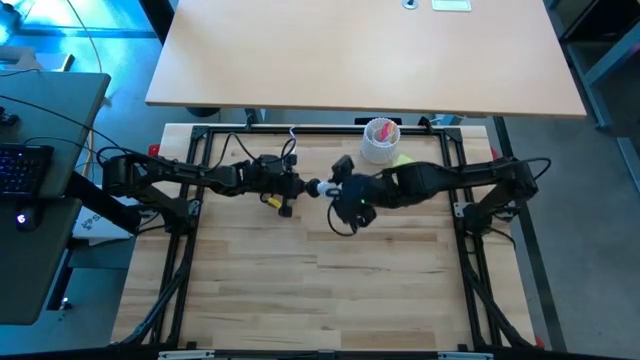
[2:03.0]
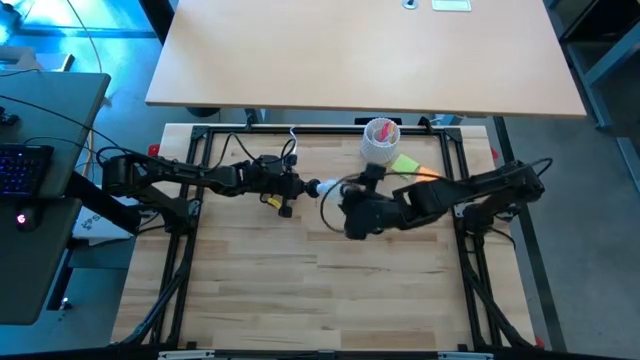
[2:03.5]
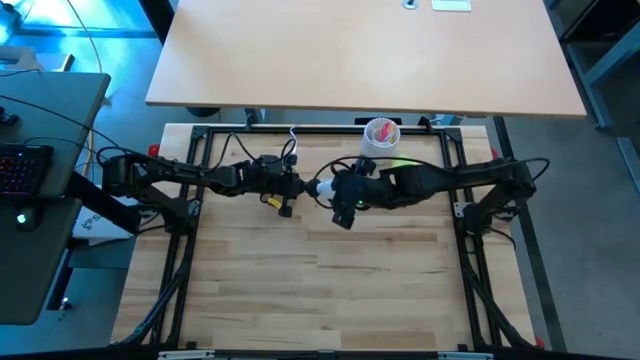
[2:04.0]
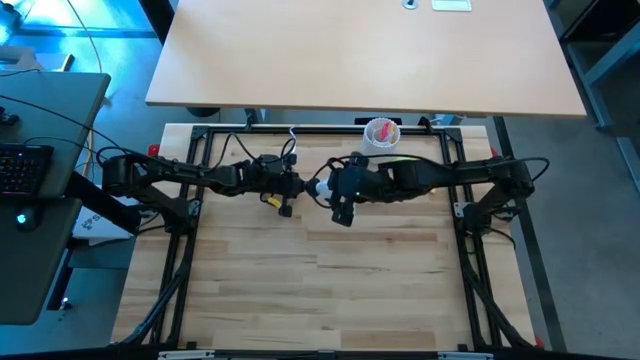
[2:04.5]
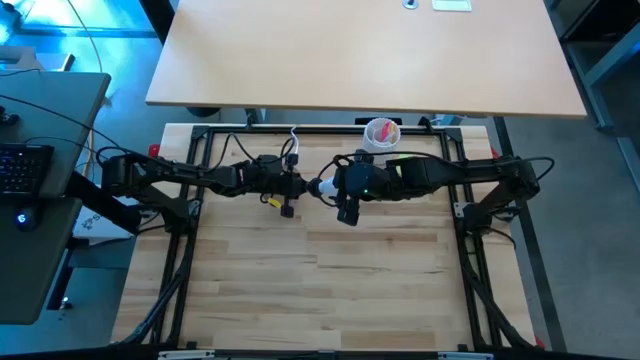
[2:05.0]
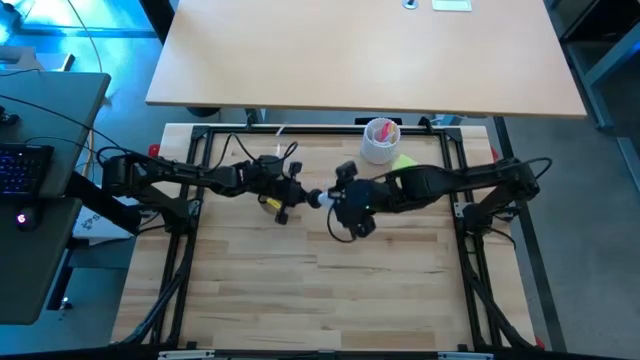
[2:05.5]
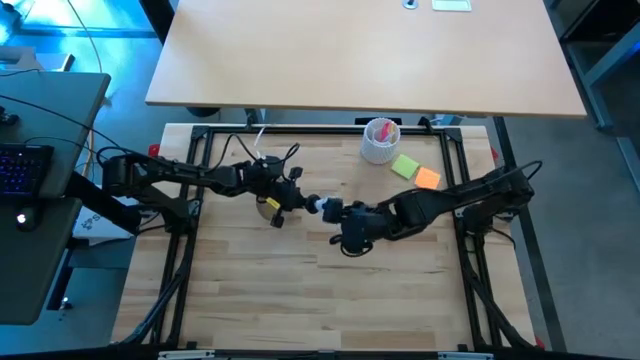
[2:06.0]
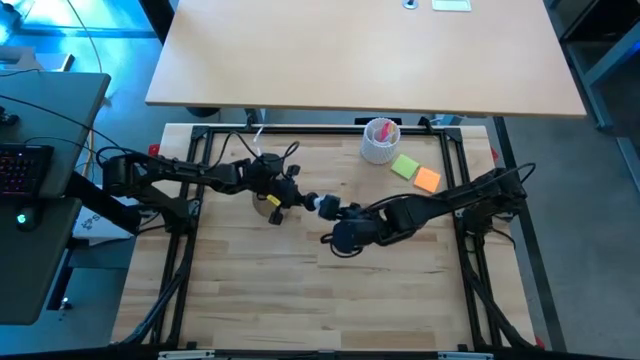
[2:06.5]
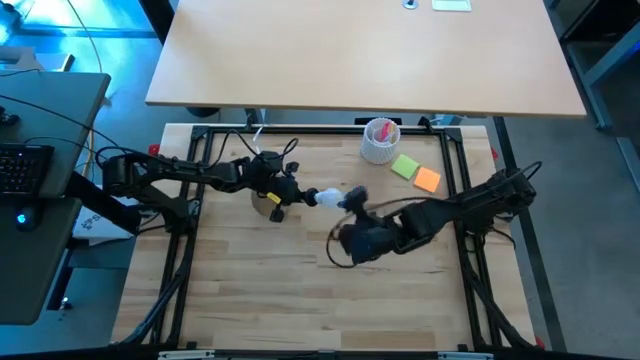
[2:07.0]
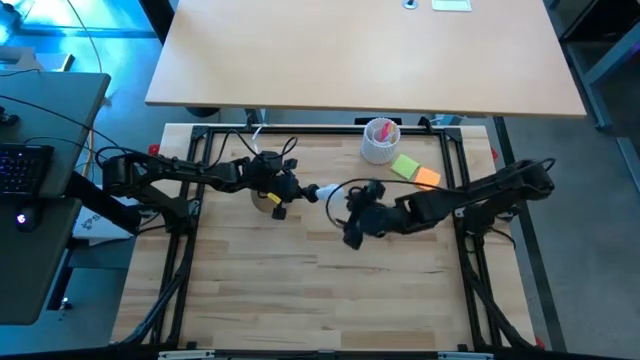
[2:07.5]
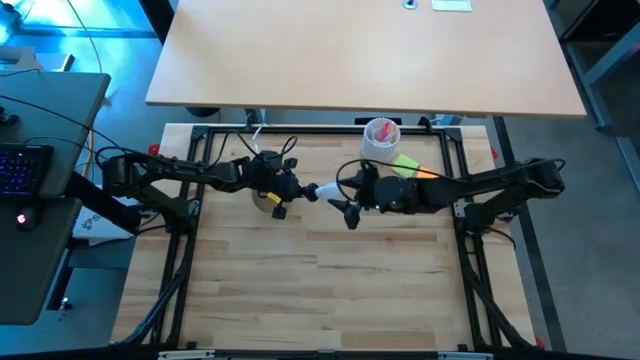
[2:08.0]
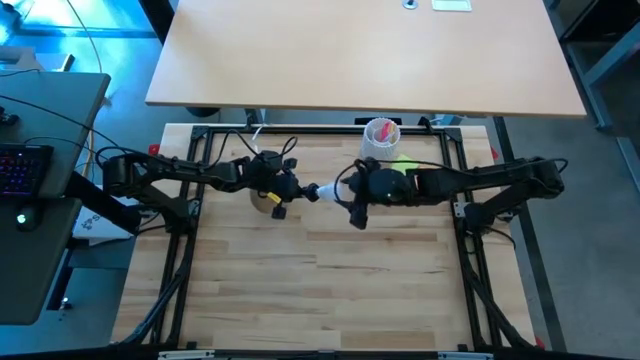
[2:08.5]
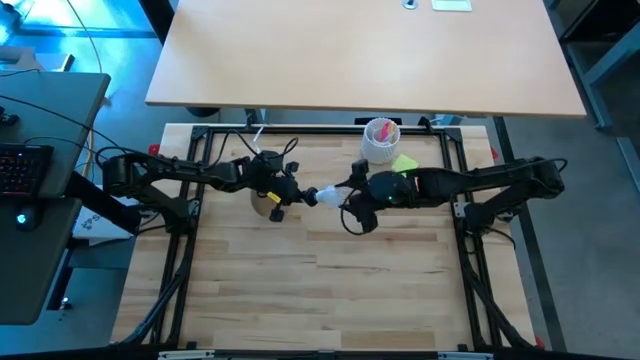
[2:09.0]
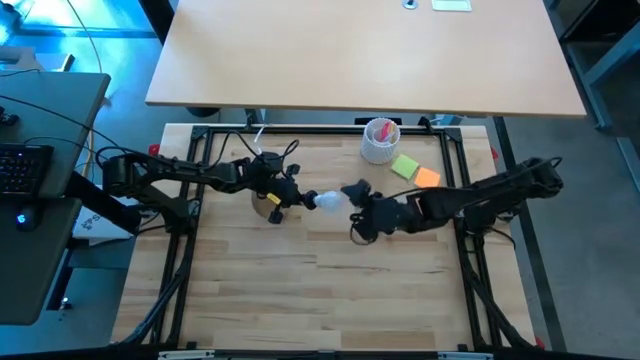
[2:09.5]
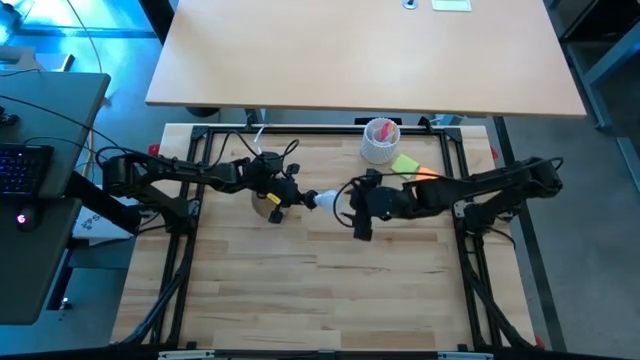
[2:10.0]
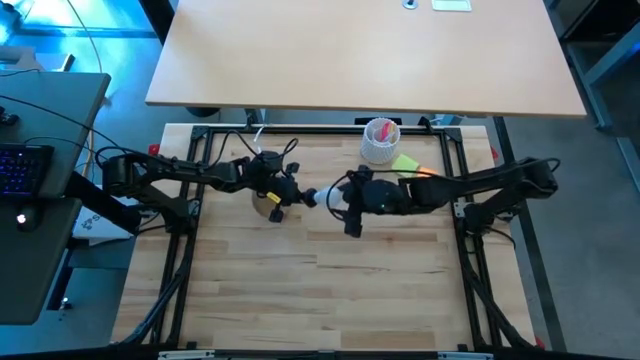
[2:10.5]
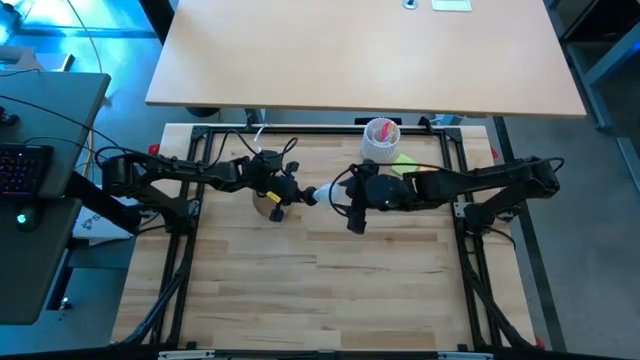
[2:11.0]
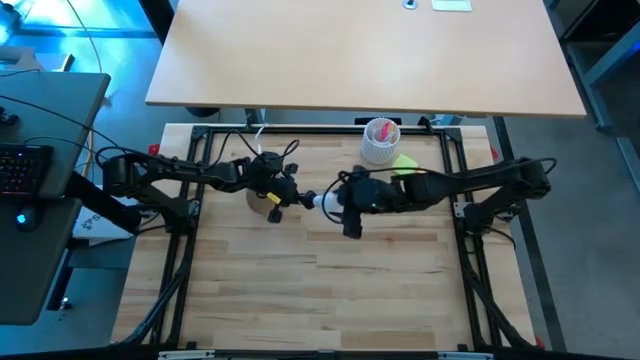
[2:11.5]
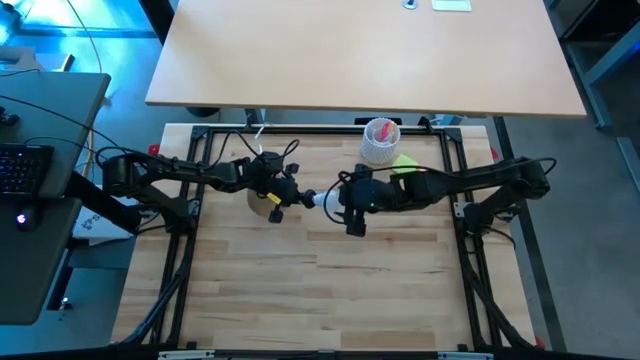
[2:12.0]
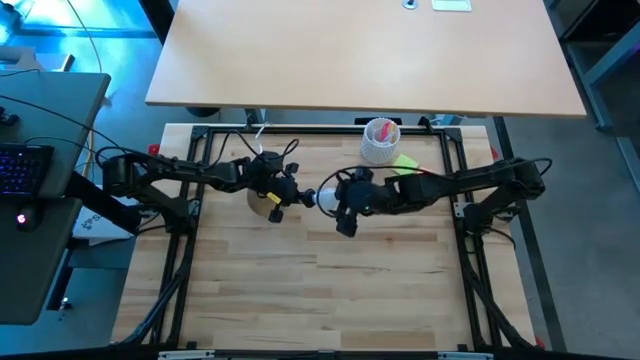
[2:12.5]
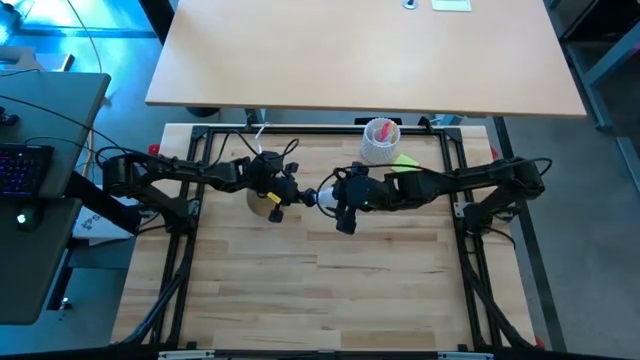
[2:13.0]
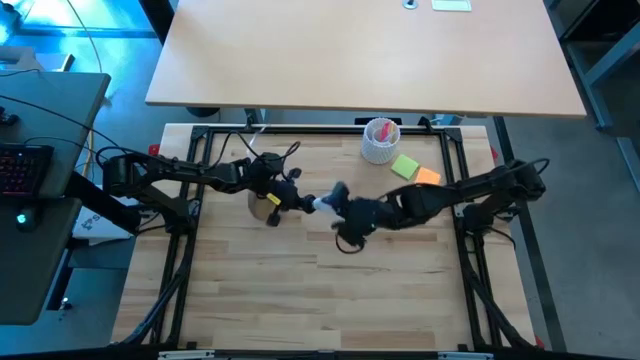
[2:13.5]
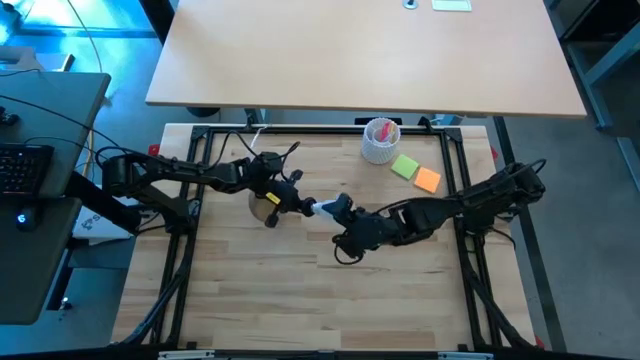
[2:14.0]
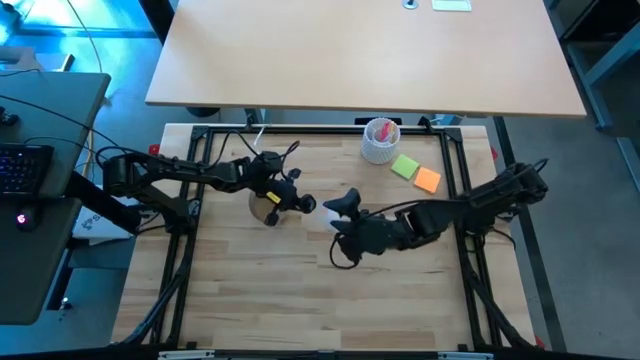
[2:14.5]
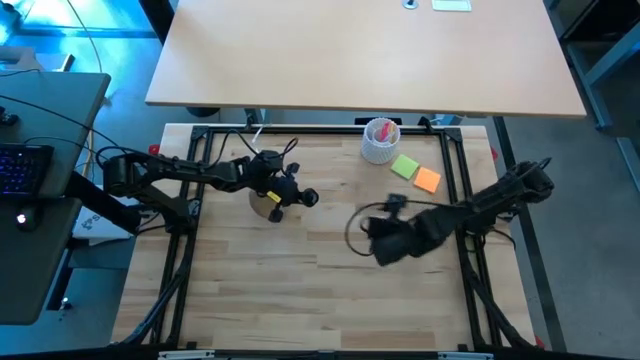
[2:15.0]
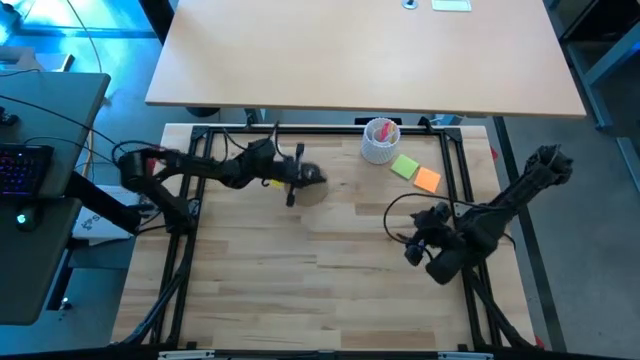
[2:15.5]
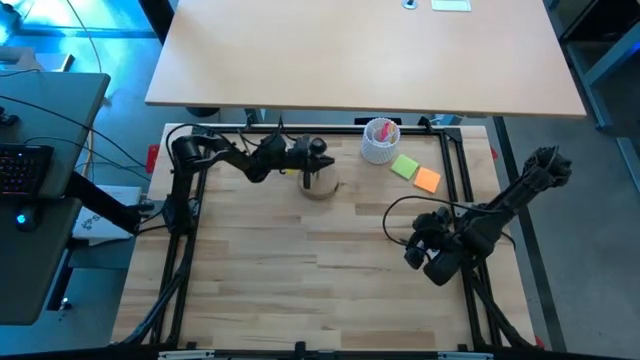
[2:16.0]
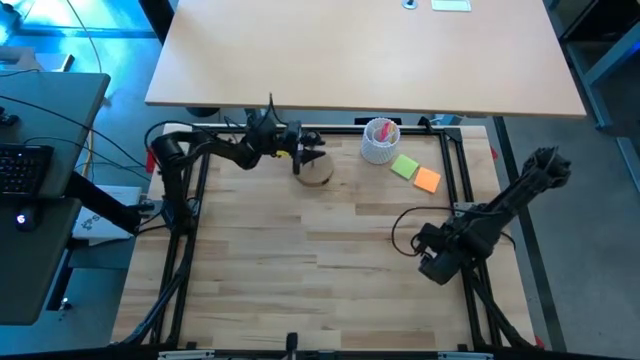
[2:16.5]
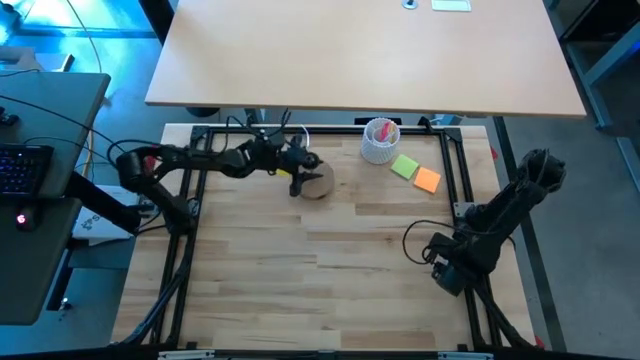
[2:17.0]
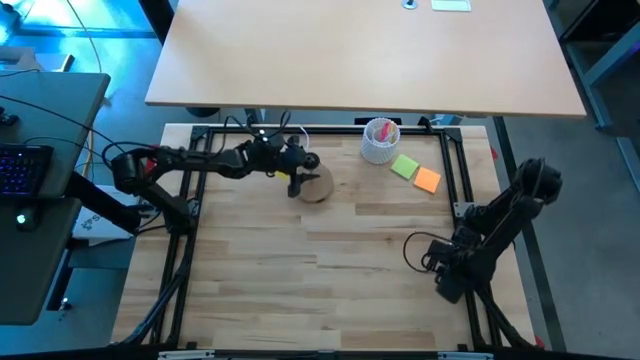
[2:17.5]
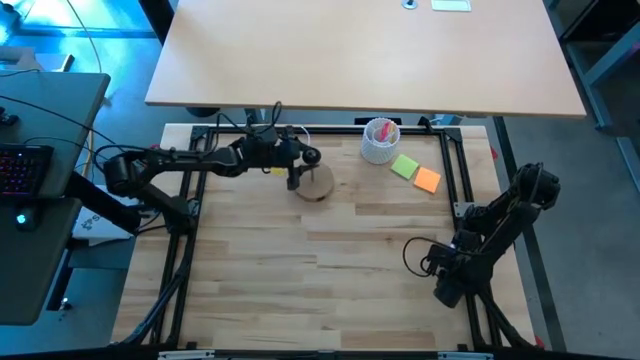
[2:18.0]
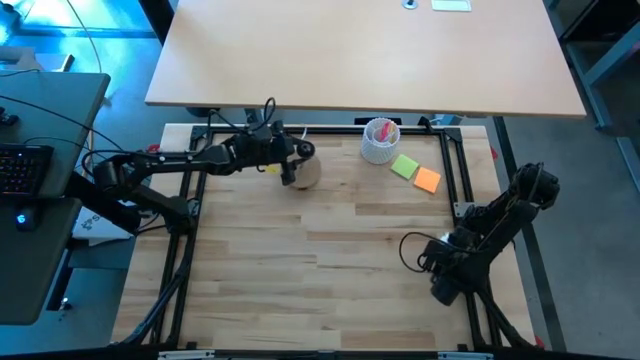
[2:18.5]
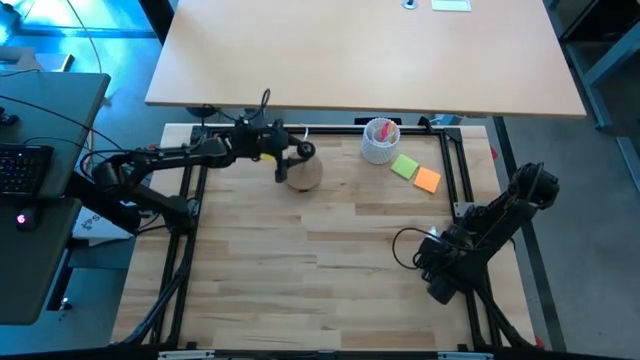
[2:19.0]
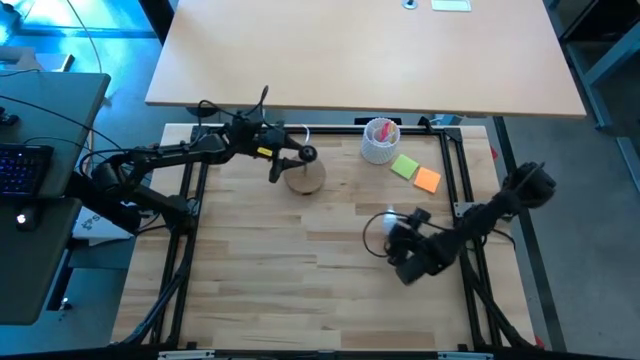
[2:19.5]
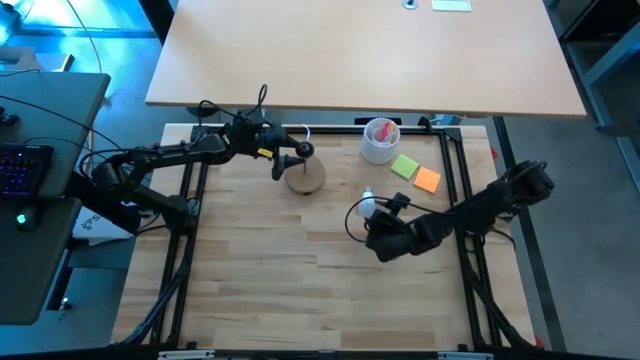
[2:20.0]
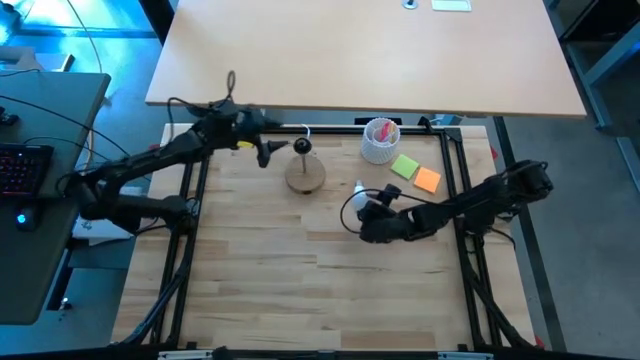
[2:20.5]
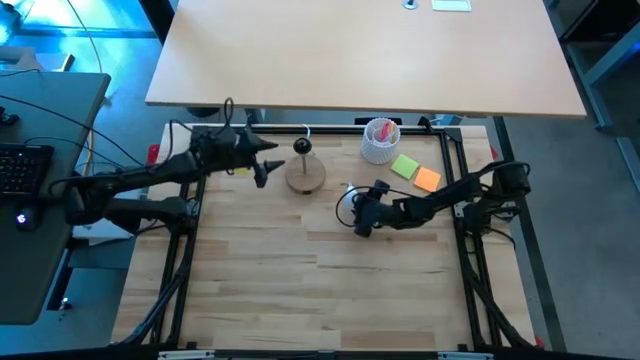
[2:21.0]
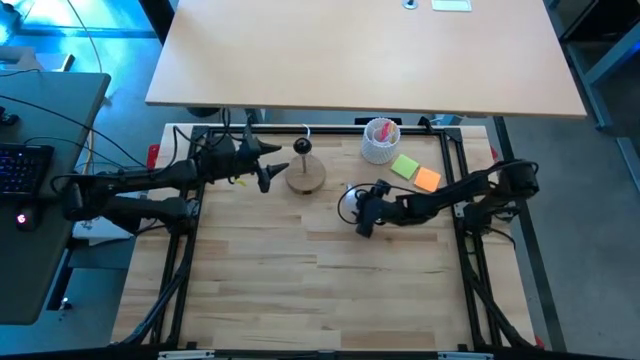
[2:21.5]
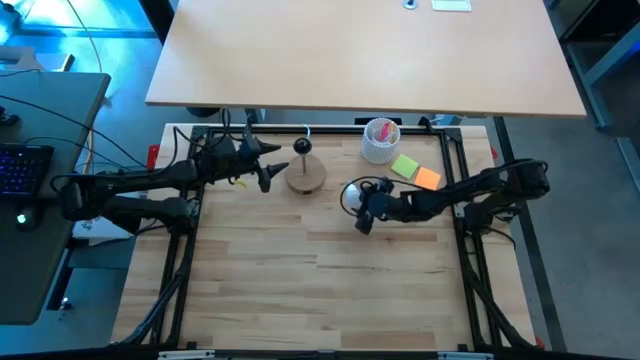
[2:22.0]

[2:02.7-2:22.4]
Task: Screw lightbulb
Remove the lightbulb from the lamp

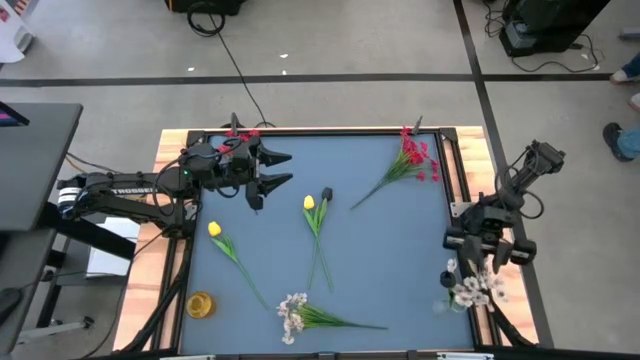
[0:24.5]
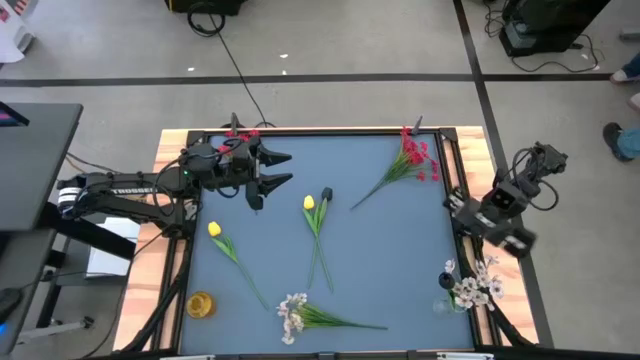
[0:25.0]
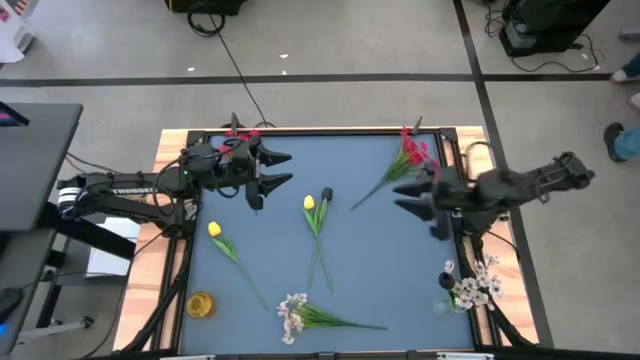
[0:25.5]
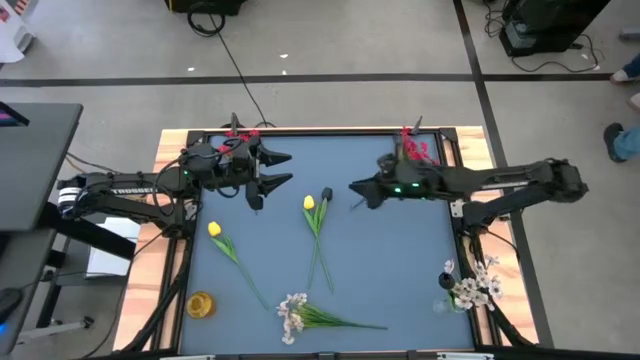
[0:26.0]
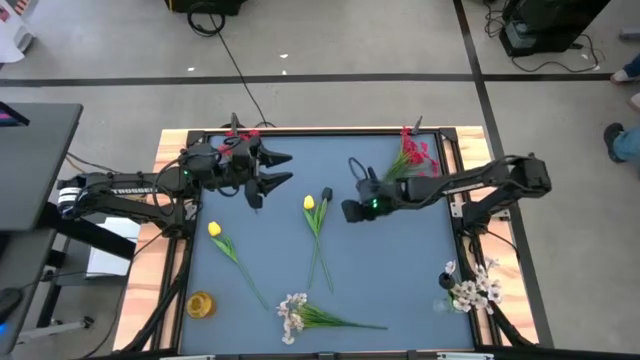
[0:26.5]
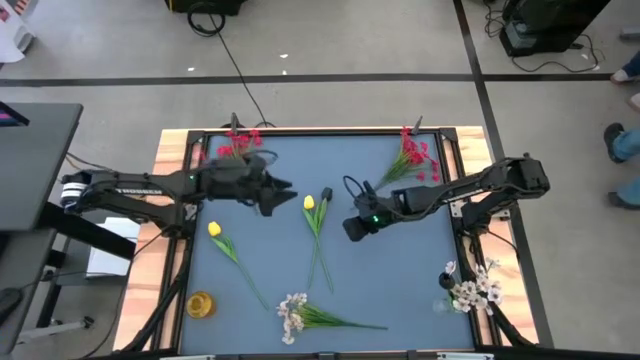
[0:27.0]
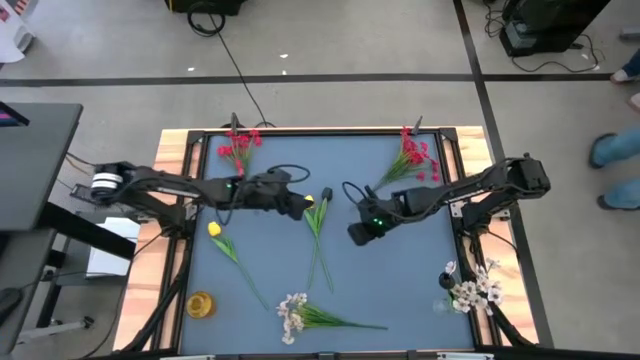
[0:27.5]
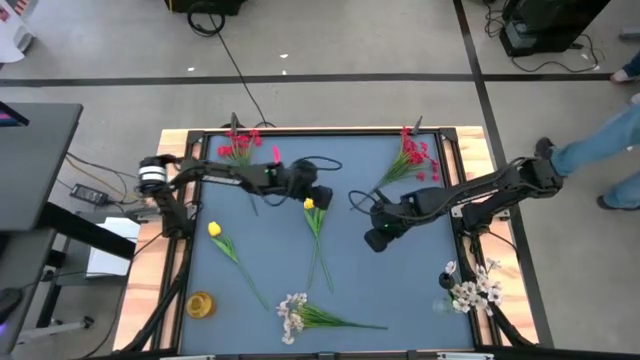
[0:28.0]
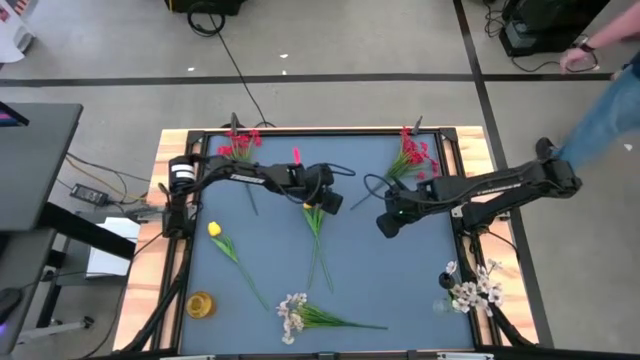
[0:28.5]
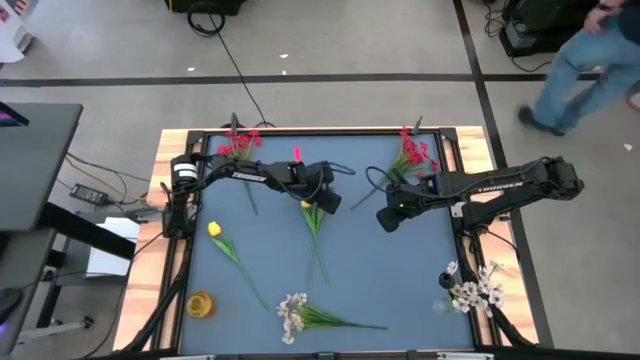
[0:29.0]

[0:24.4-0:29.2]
Task: Sort flowers into vase by color
Put the black flower into the transparent vase
